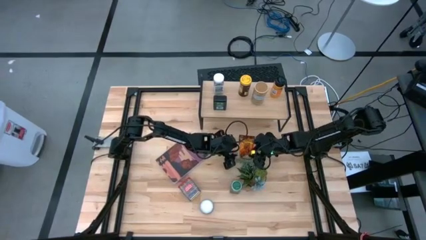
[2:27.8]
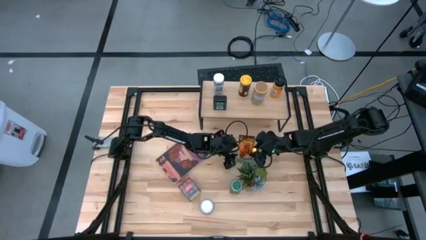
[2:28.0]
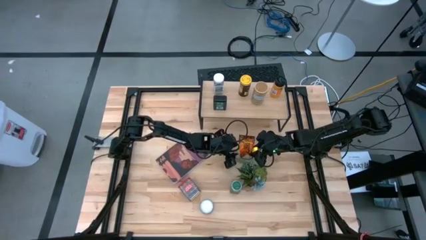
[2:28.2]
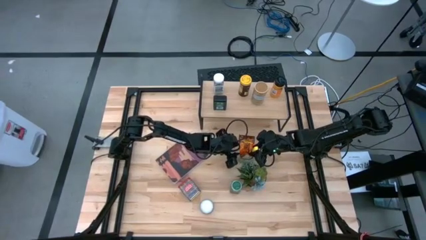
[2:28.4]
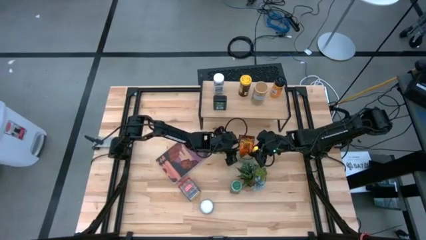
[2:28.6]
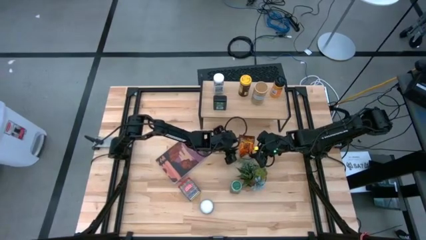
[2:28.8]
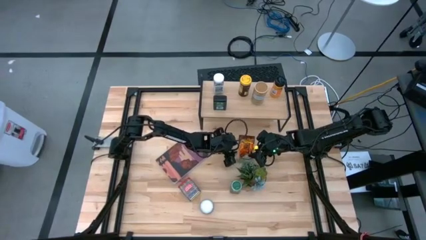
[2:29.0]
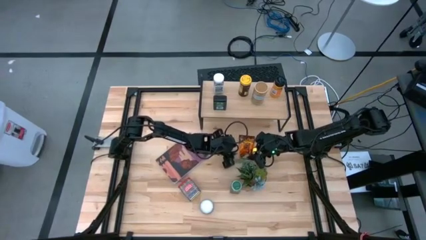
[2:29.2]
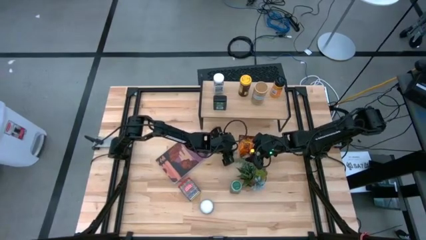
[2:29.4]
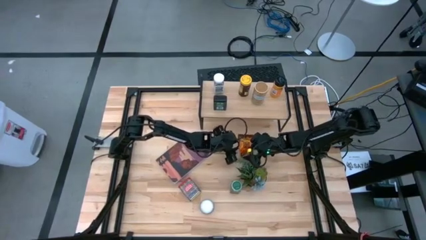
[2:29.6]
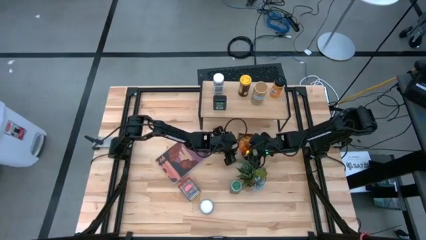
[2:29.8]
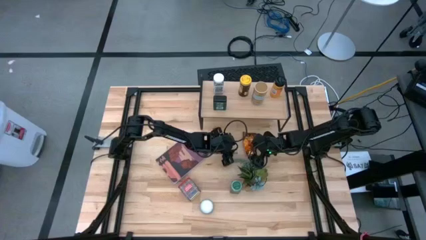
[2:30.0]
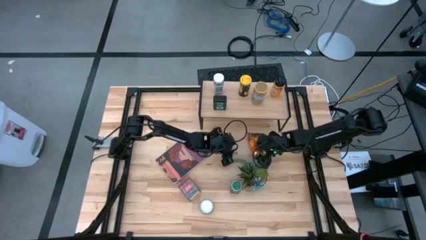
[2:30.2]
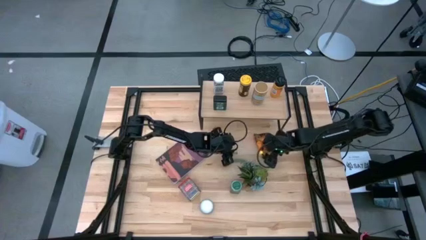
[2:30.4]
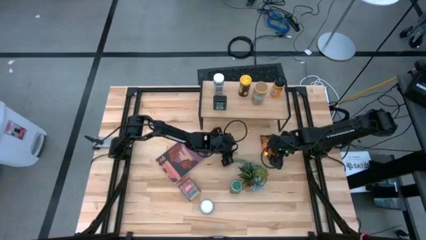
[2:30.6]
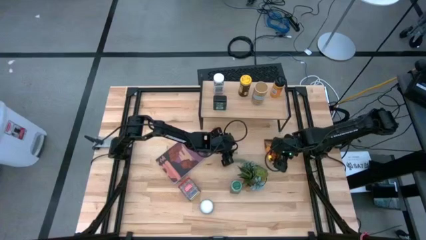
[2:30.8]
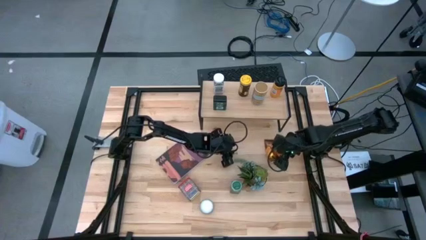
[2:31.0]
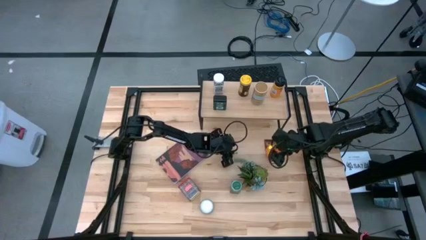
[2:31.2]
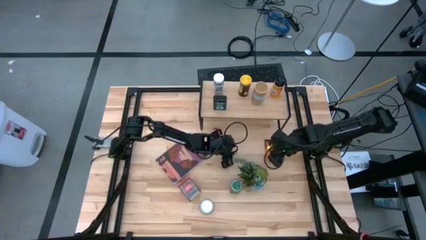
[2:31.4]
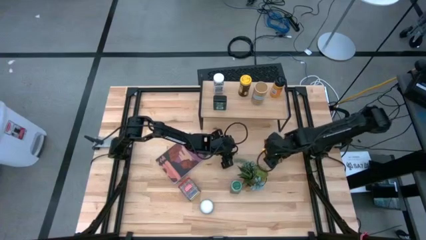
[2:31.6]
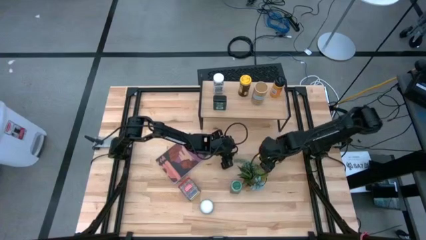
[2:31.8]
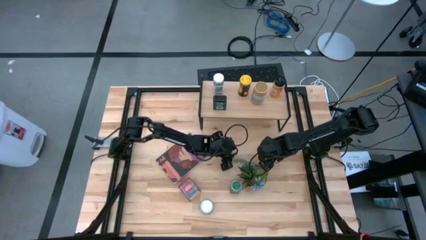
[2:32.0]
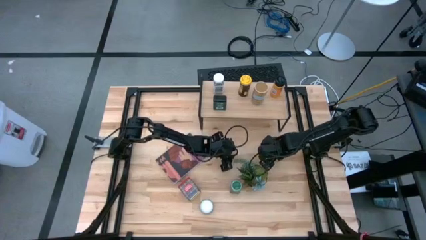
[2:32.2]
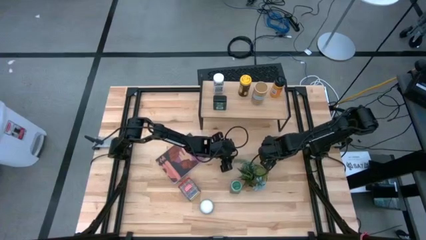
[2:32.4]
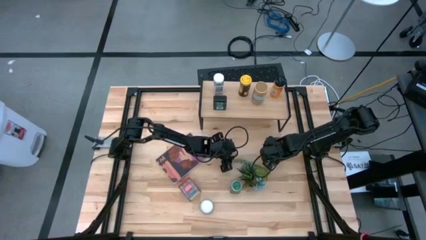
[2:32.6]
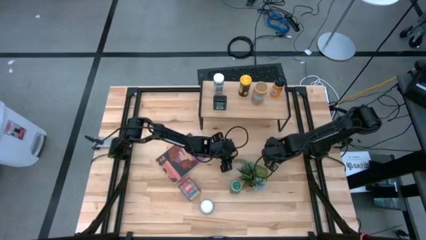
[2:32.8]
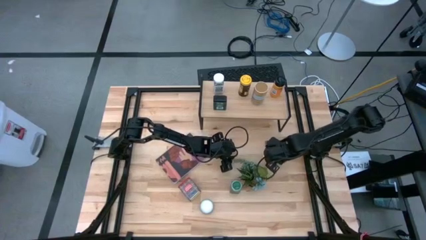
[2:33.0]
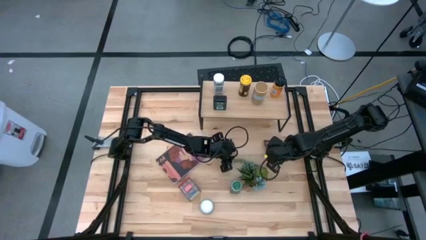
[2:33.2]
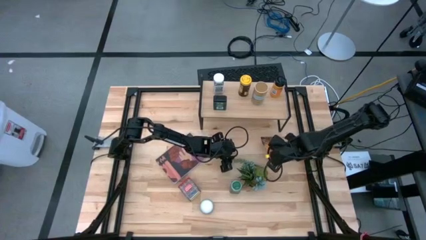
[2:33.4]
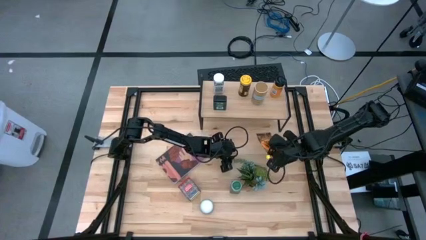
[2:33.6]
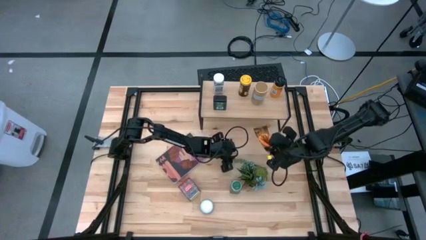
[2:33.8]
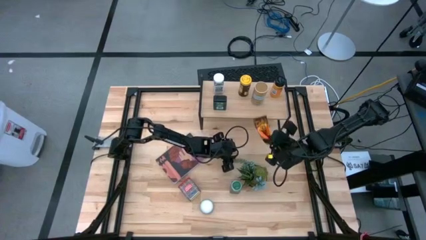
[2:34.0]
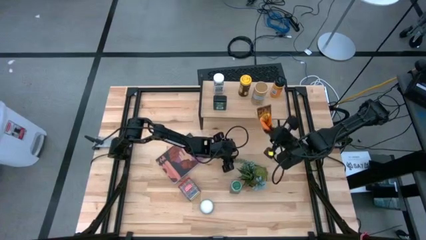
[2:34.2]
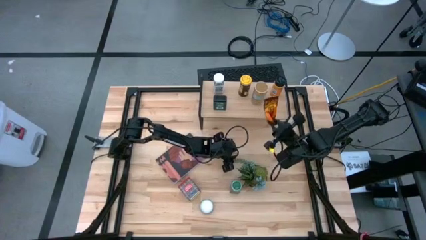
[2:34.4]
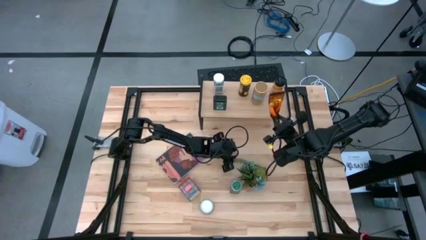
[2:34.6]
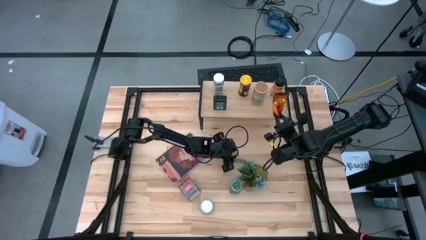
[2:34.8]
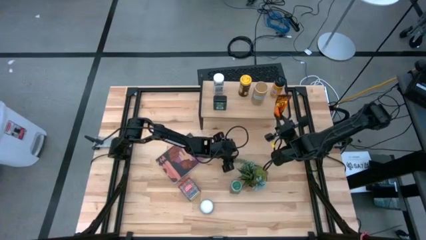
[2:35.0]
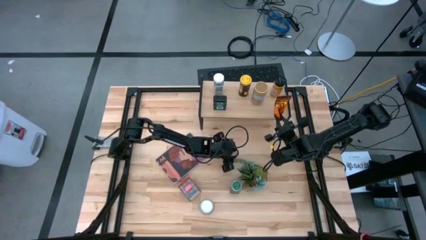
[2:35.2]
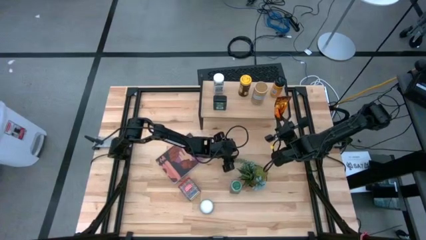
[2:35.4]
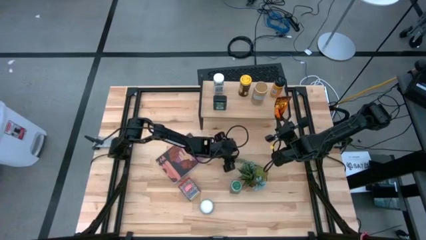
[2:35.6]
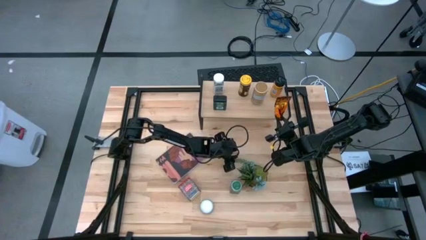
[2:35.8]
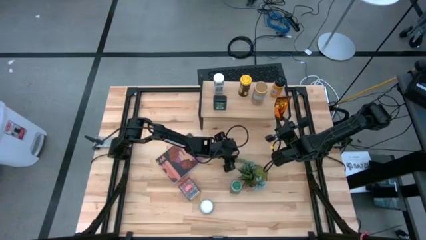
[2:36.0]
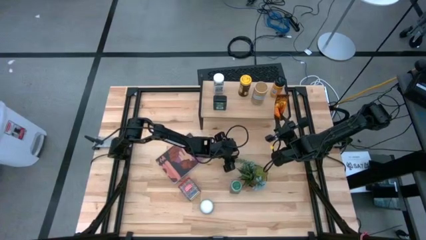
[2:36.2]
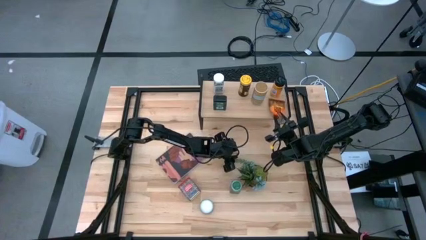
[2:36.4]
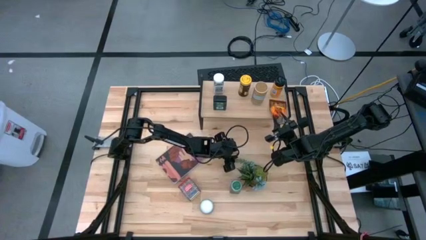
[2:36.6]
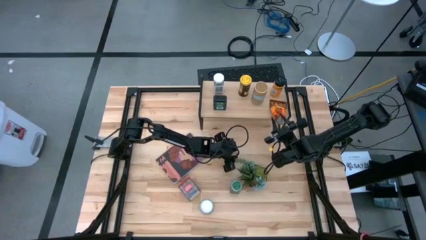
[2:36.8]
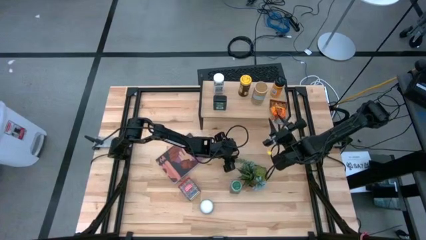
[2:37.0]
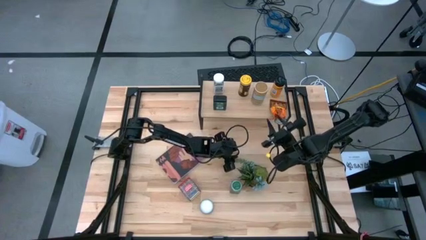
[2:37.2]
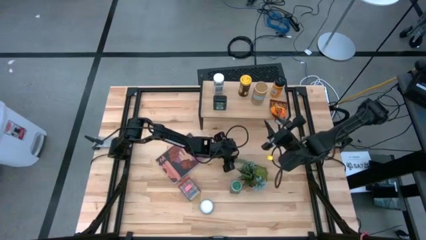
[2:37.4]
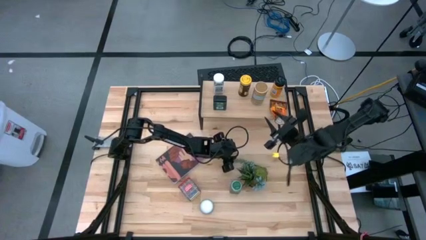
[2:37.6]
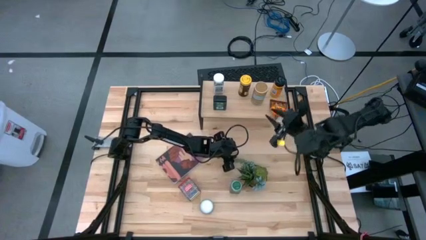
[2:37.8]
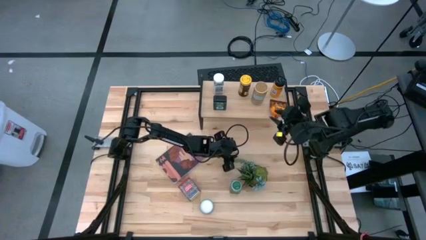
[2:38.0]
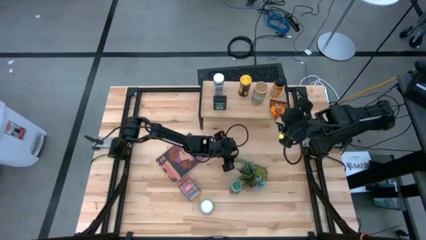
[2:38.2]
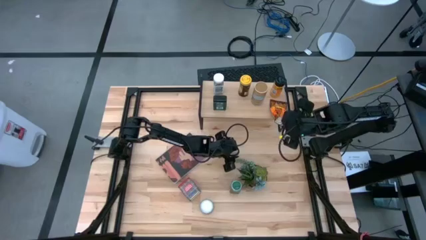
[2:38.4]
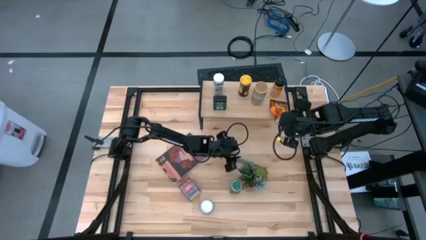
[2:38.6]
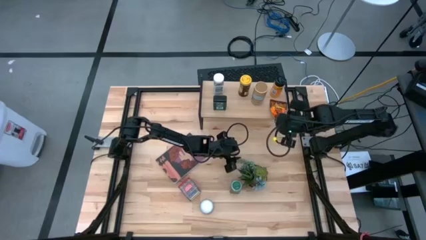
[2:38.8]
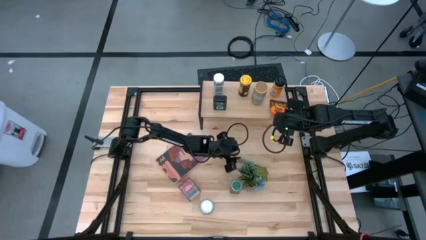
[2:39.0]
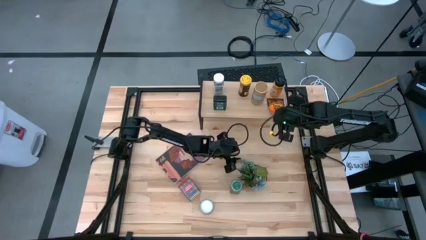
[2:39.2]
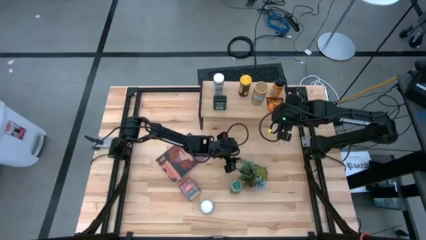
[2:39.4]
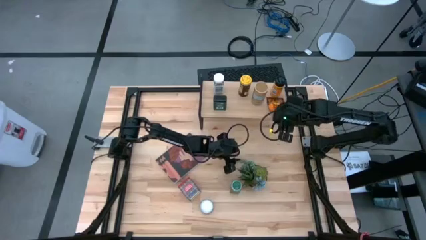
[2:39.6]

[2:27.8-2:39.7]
Task: Shelf spices
Put the orange seasoning bag on the shelf

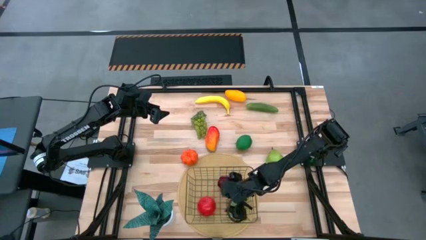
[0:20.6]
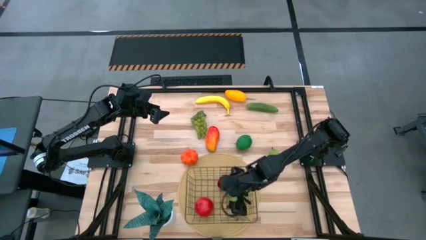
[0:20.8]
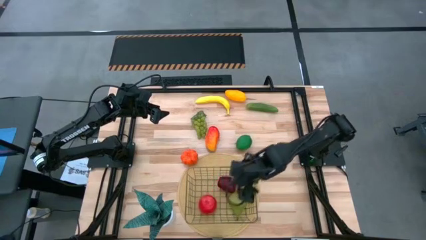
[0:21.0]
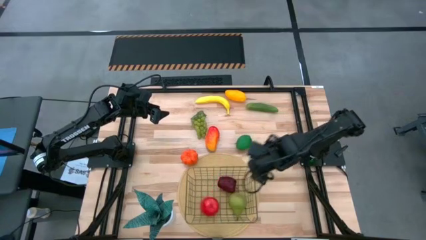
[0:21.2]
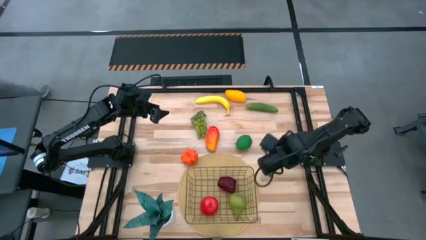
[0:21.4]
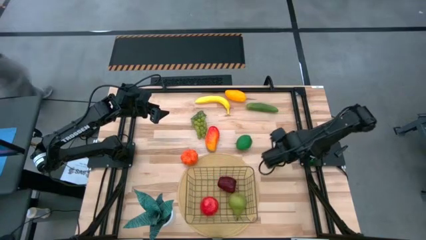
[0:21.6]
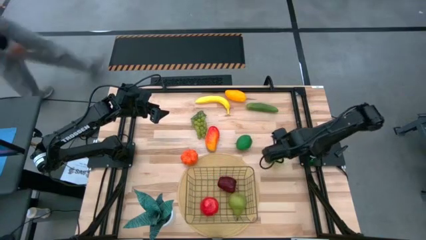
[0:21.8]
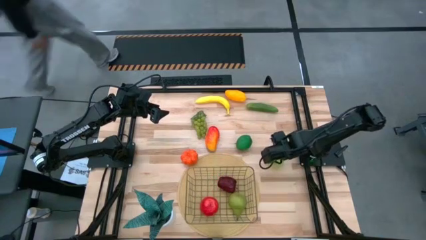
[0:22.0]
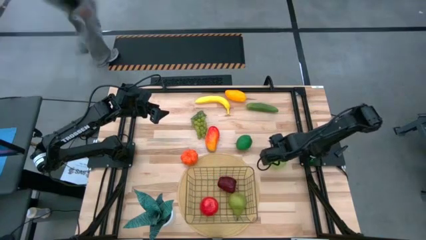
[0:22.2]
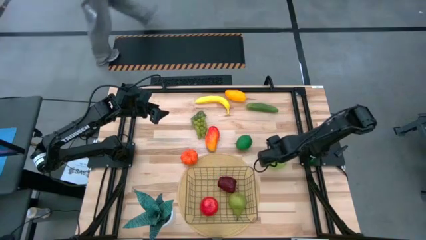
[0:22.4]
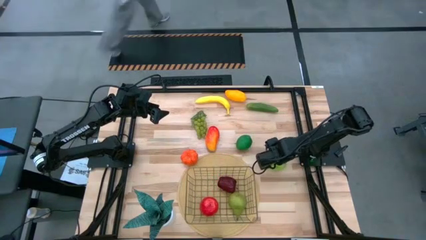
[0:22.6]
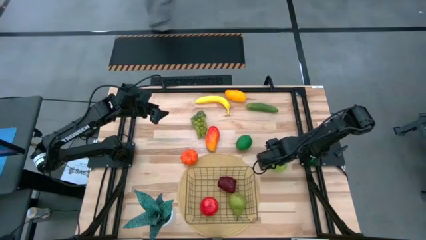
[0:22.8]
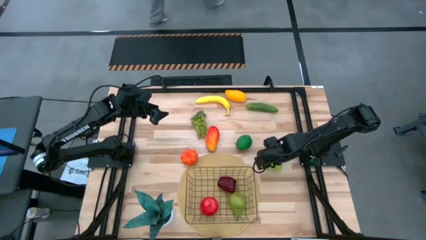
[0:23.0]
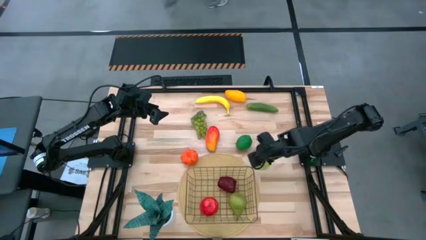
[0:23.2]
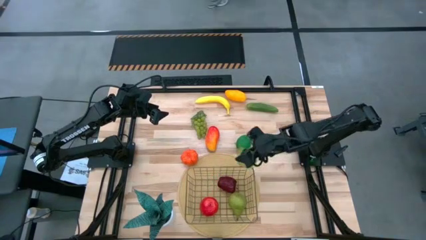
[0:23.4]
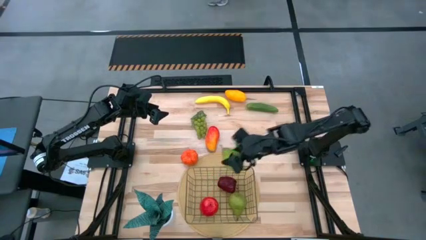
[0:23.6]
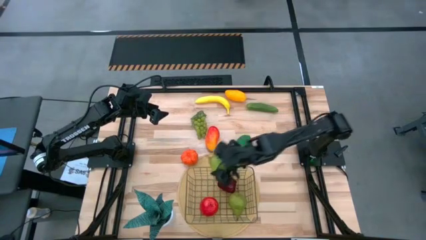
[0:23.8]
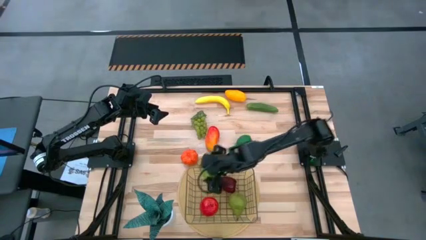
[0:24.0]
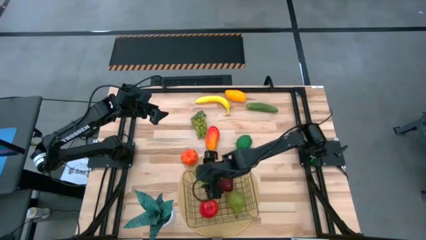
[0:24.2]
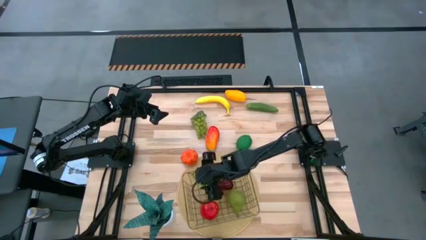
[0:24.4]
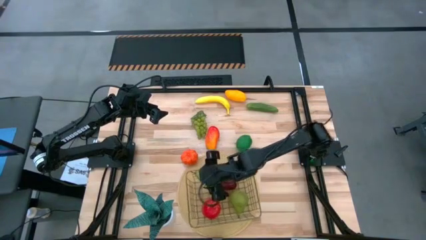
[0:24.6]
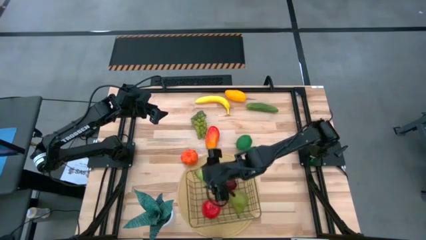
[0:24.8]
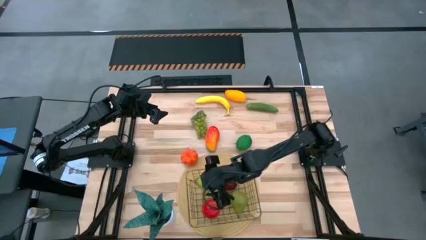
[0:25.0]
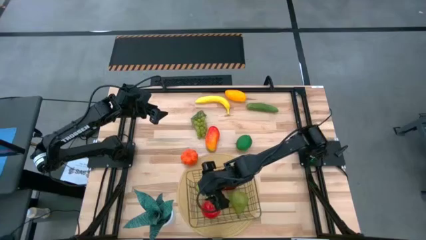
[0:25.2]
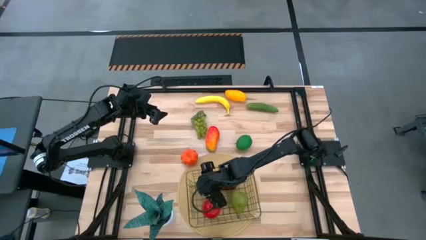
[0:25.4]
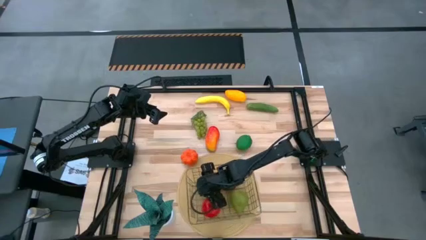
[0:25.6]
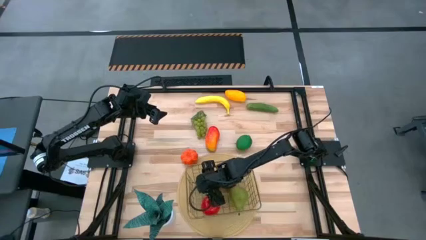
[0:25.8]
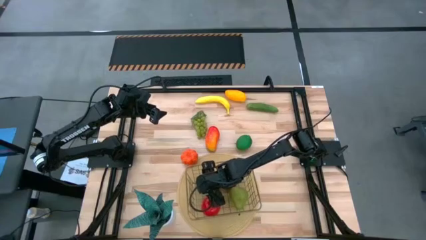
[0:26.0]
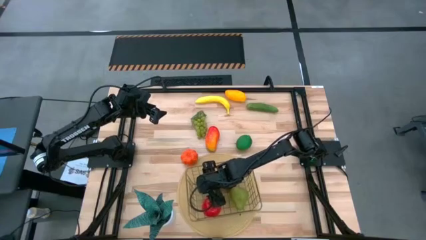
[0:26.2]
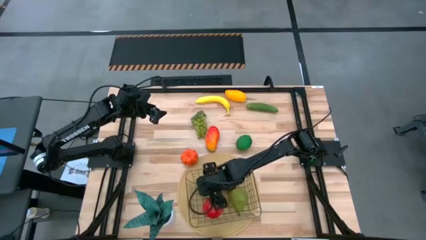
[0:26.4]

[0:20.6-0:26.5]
Task: Build produce basket
Put the pear into the wire basket
